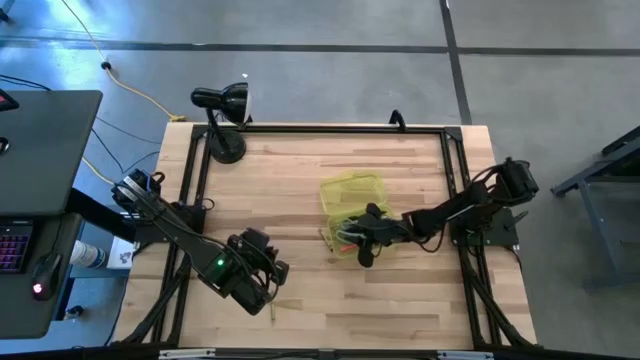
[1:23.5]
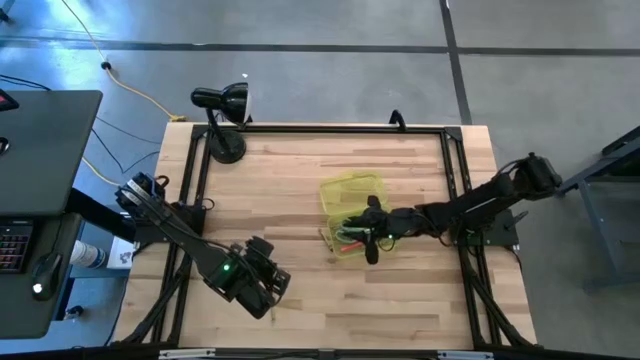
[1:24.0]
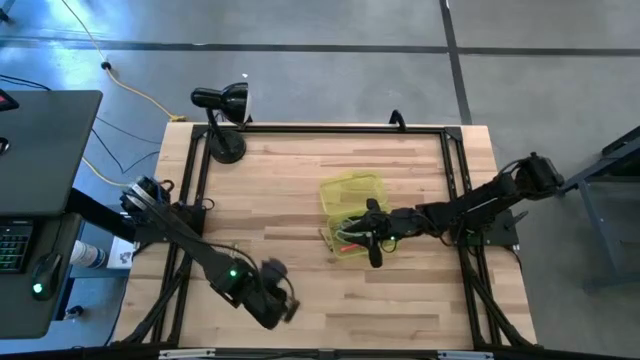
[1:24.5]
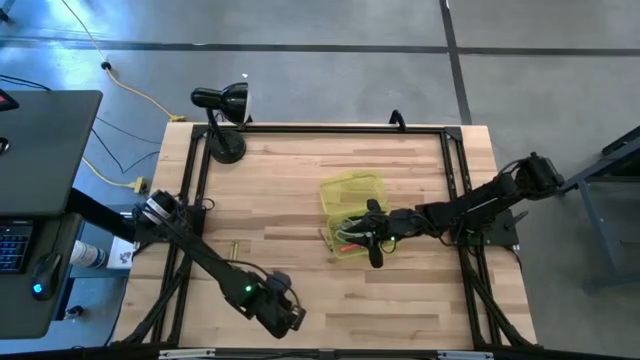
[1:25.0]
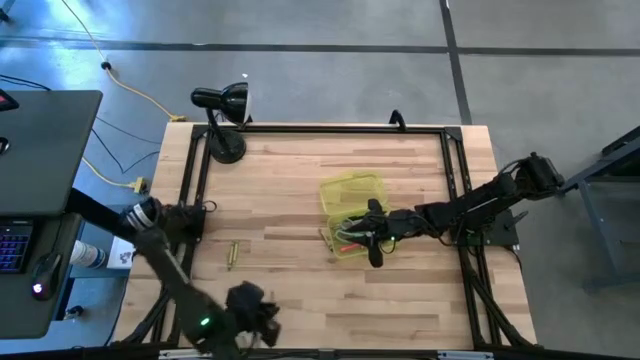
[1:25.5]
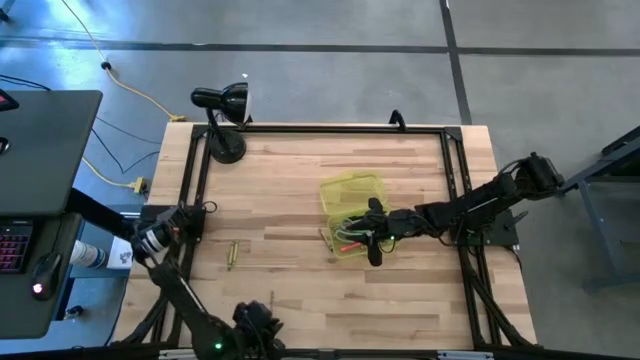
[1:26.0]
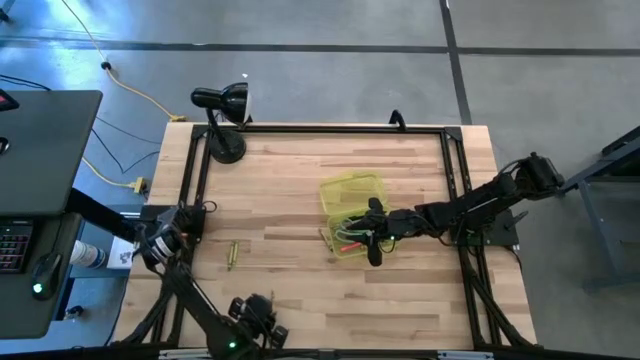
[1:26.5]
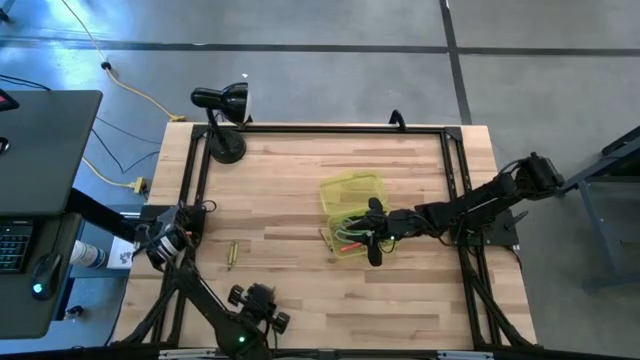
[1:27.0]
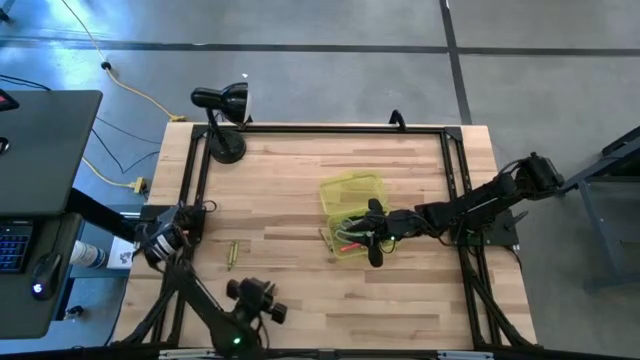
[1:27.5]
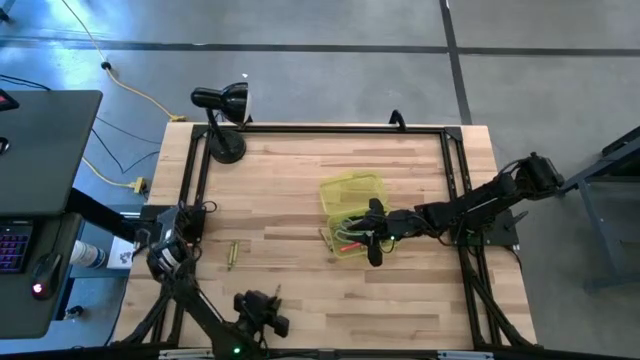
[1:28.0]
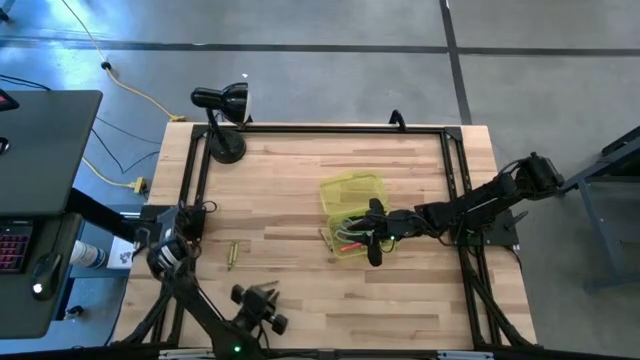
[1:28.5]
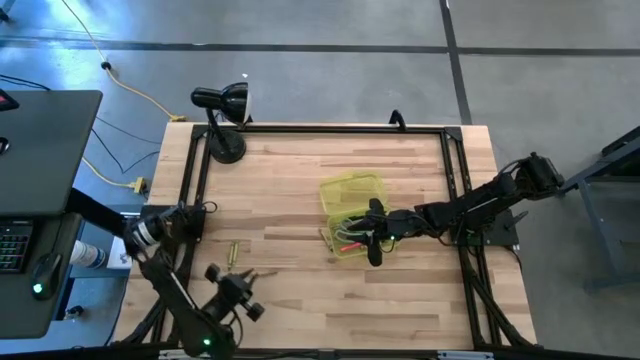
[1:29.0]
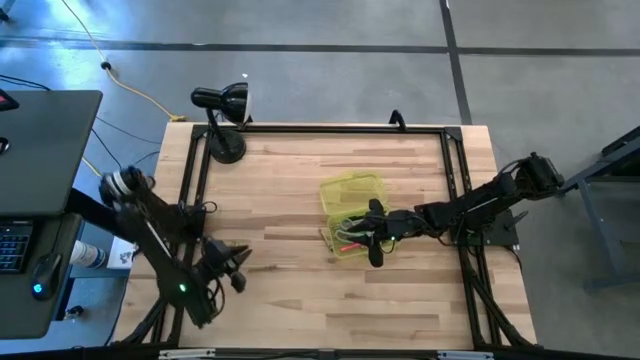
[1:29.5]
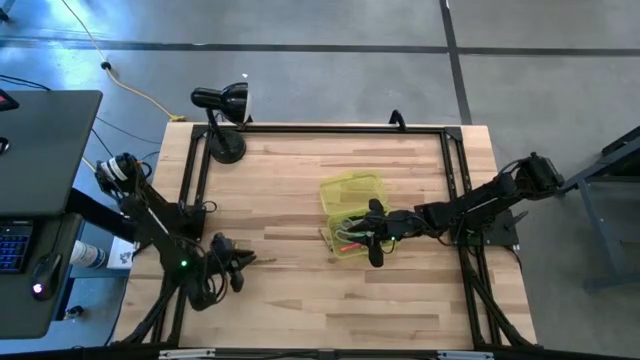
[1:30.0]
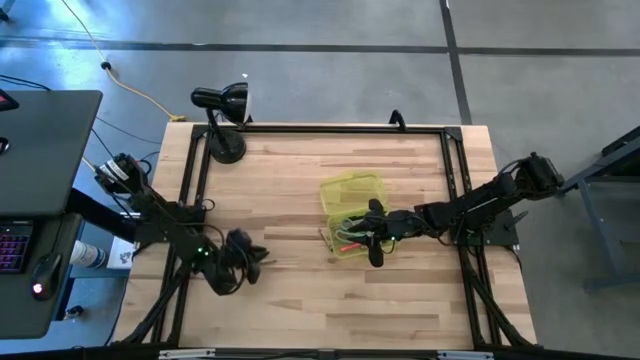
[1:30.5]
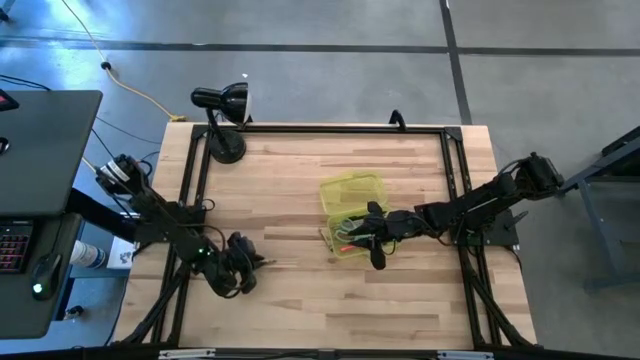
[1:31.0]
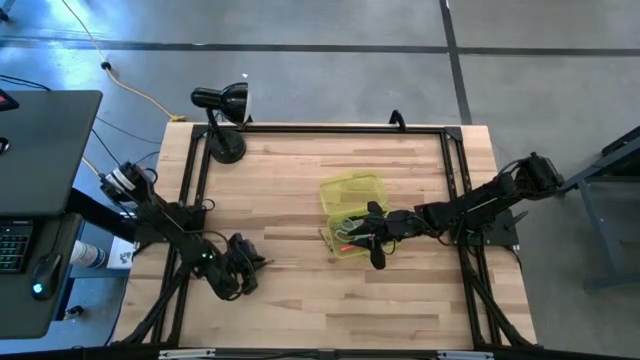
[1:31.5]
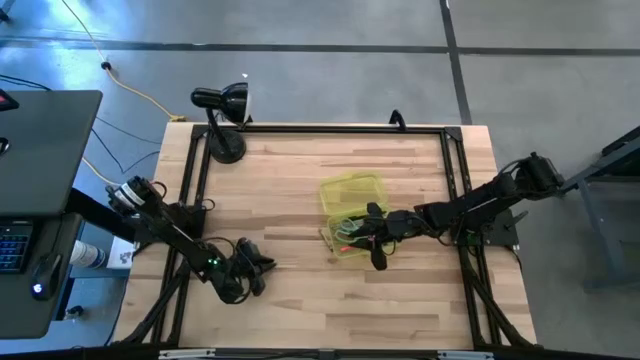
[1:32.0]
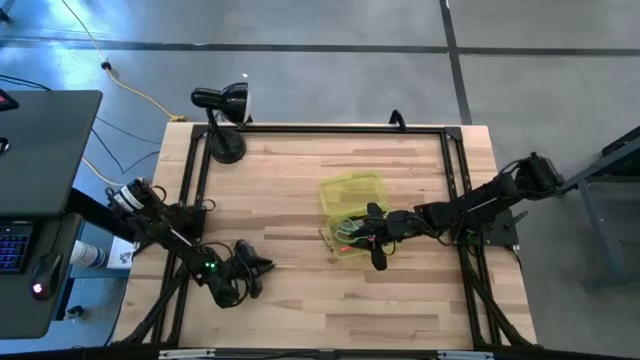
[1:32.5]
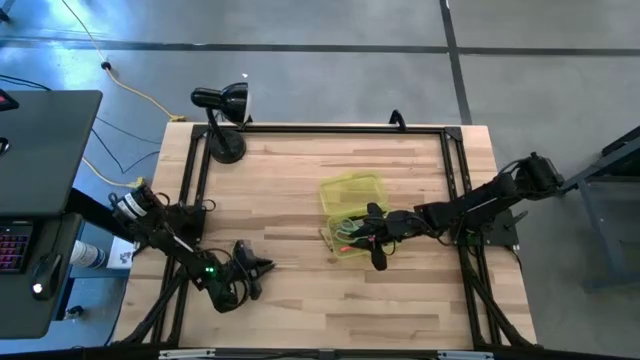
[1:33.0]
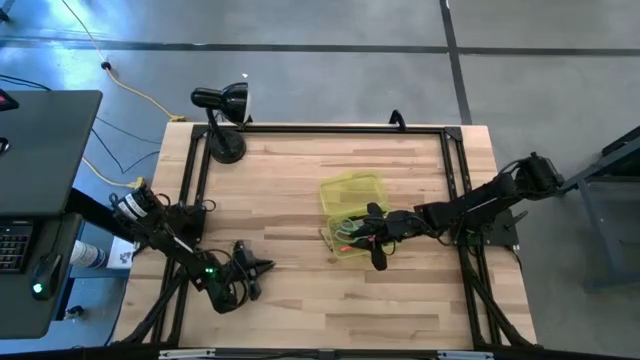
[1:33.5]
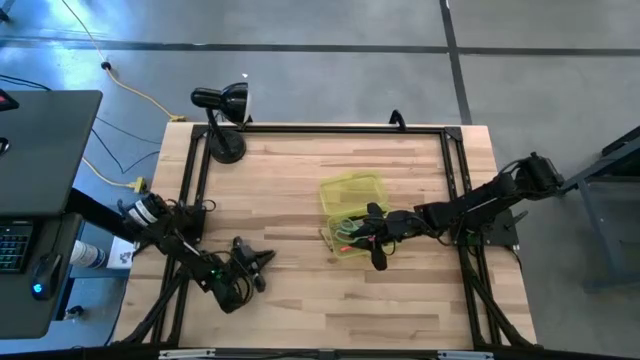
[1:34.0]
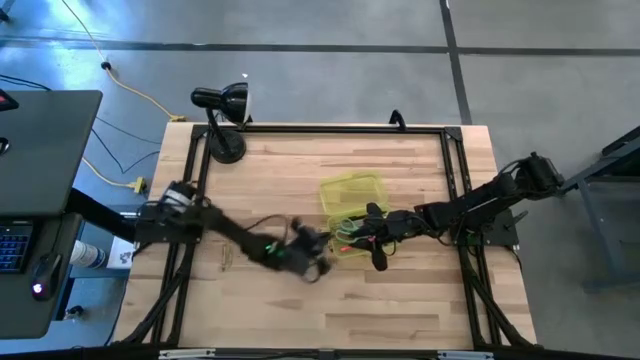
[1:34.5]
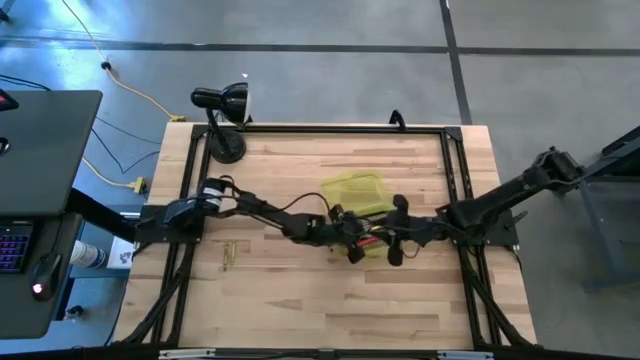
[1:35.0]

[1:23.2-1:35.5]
Task: Pick & place school supplies into a supply box
Put the green crayon into the yellow supply box

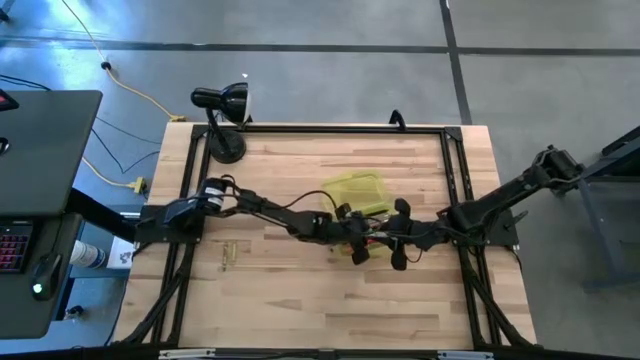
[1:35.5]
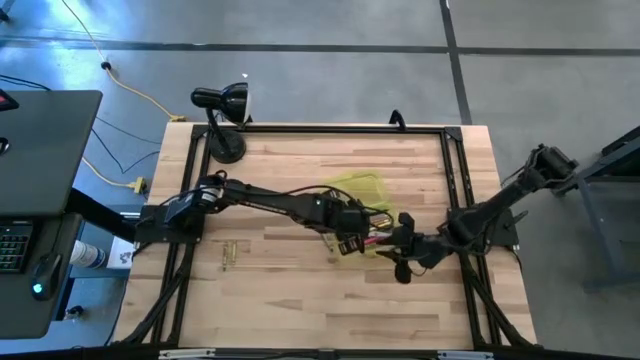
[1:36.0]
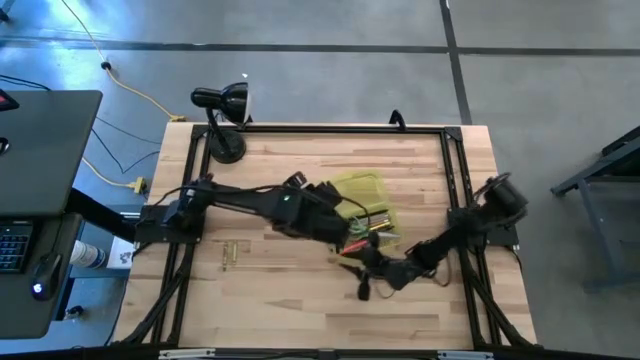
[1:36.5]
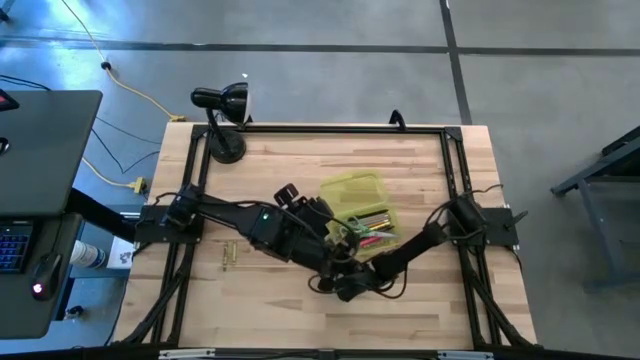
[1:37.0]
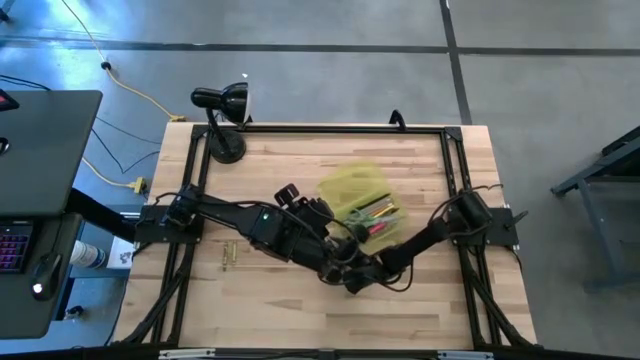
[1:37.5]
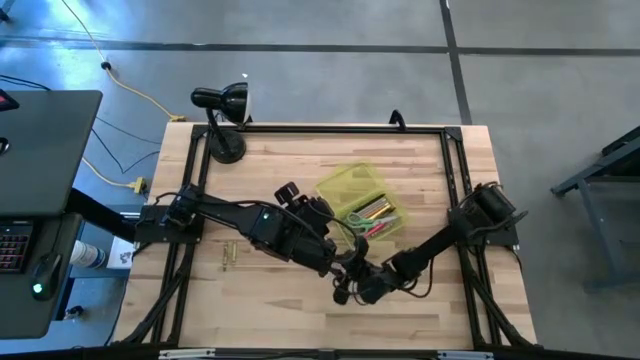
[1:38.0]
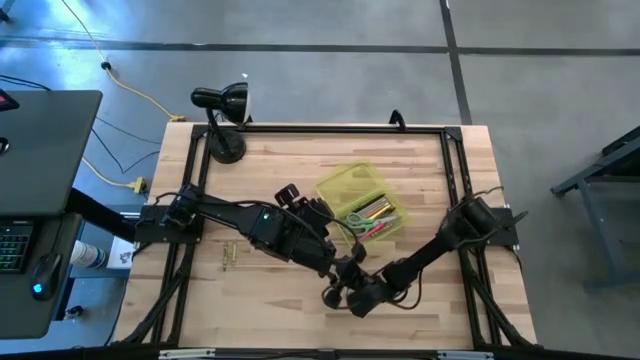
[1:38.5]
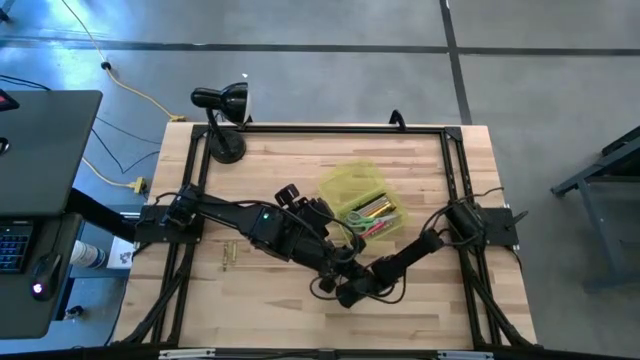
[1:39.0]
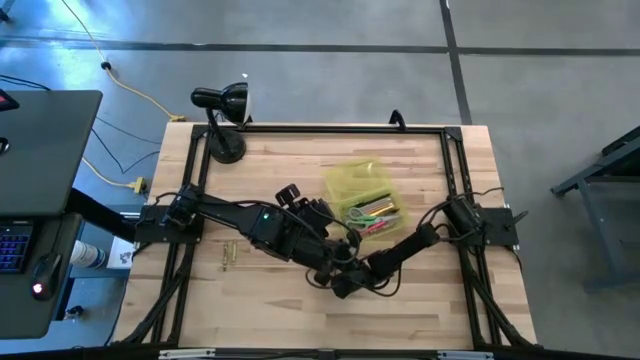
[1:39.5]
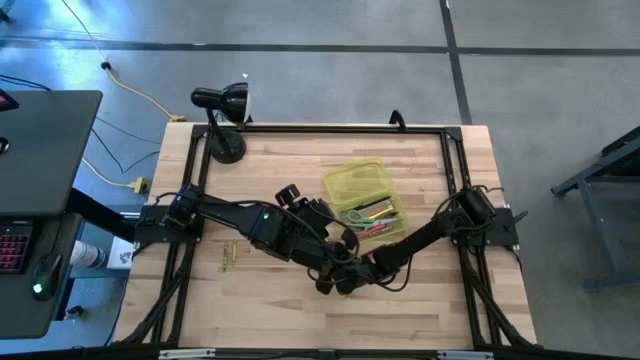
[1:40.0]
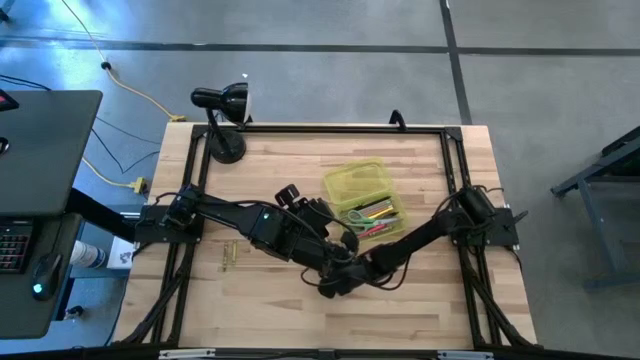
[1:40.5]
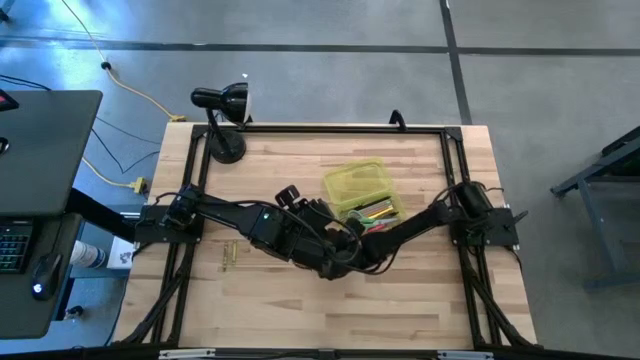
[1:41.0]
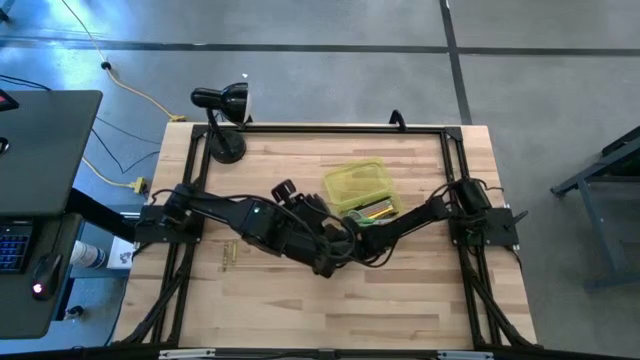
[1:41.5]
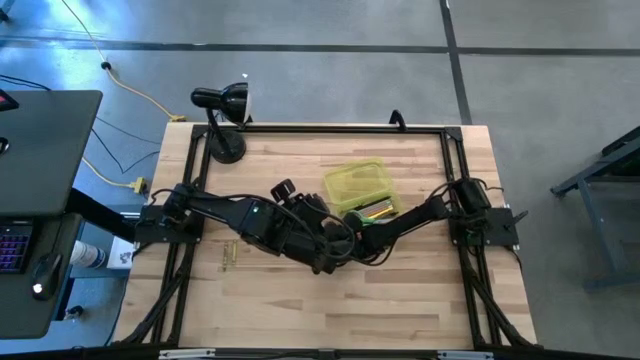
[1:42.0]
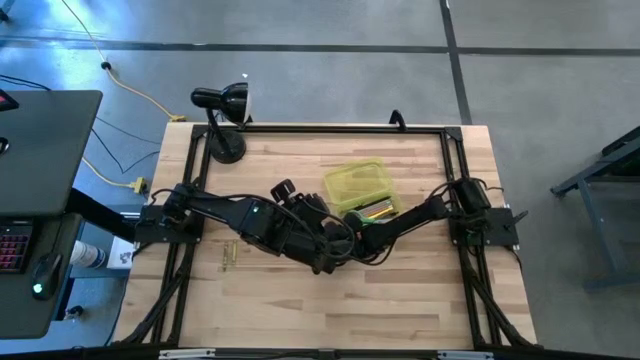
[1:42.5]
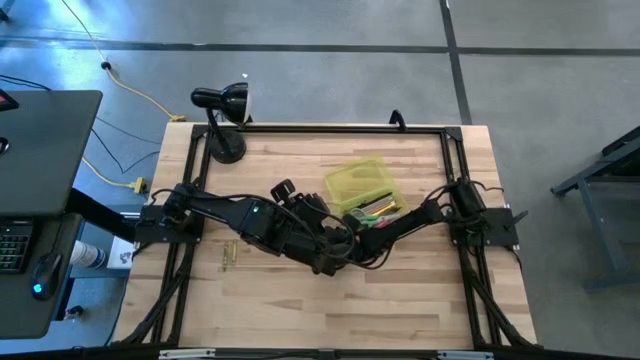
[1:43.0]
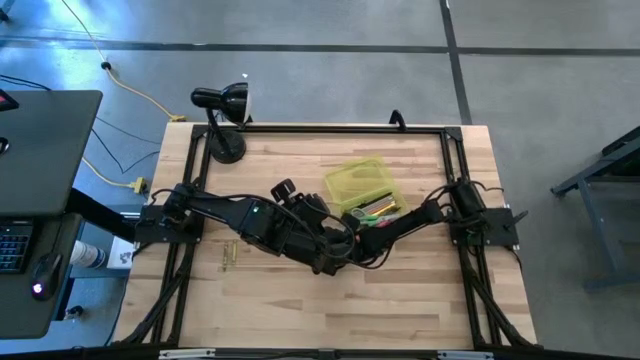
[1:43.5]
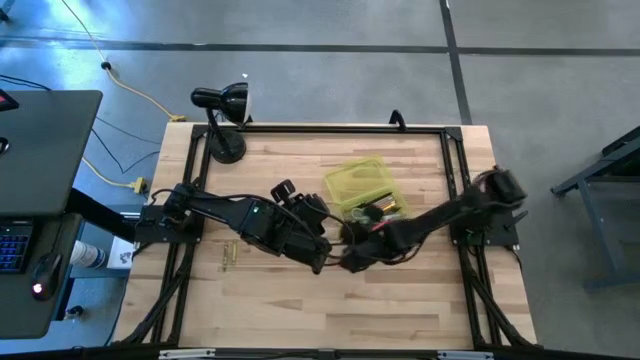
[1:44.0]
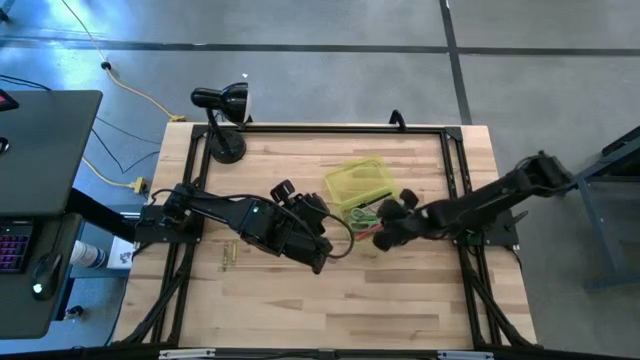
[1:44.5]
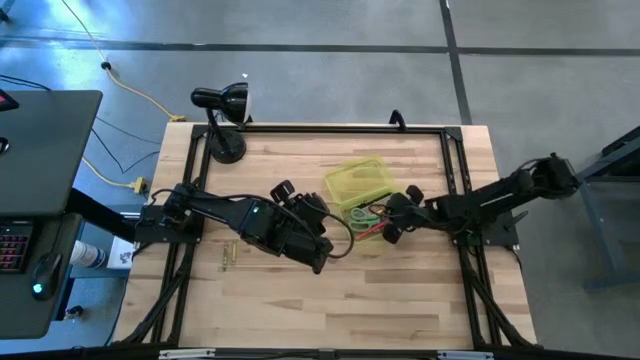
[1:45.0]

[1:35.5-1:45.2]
Put the green crayon into the yellow supply box

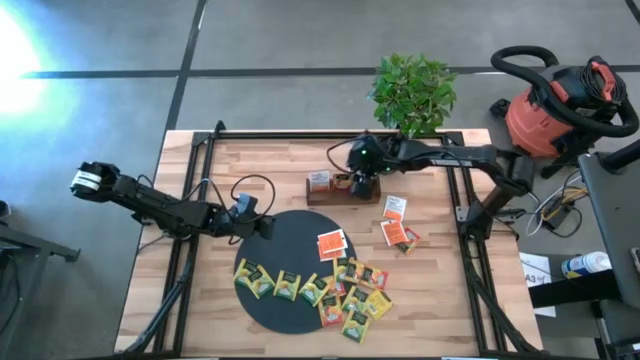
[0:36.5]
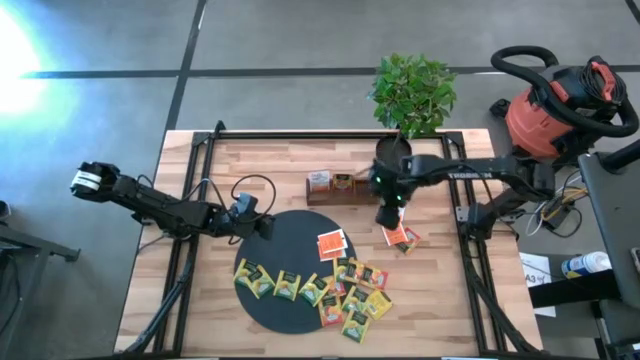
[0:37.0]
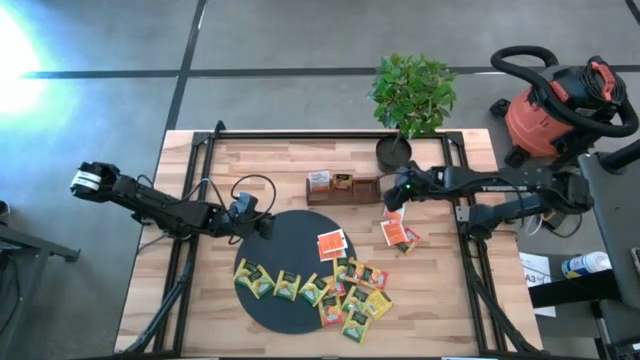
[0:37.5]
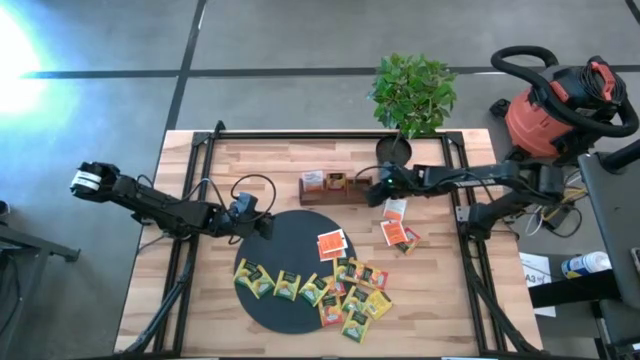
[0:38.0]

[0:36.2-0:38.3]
Task: Pick & Place Tea
Adjust the brown wooden organizer on the table
